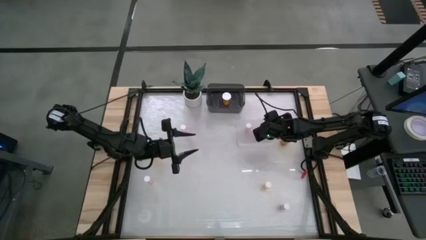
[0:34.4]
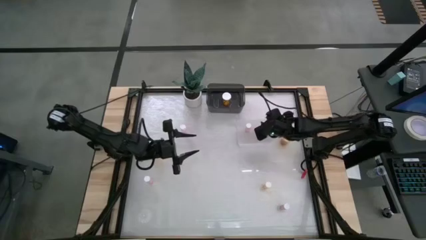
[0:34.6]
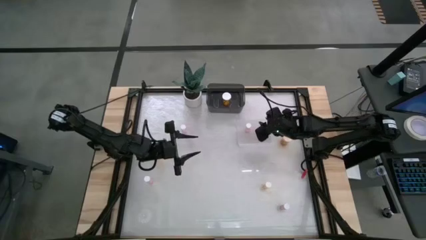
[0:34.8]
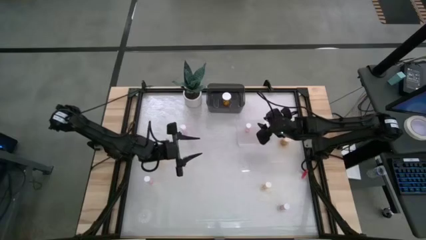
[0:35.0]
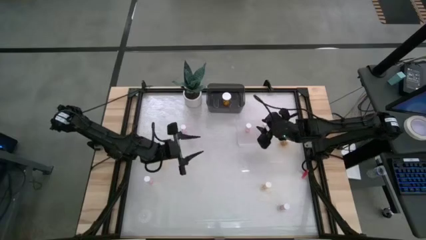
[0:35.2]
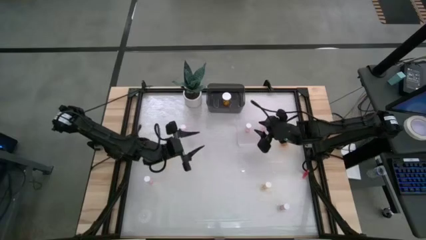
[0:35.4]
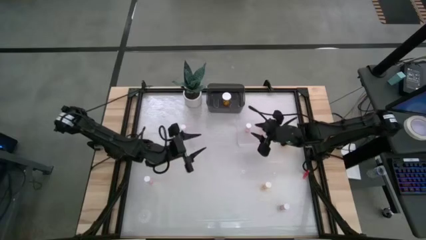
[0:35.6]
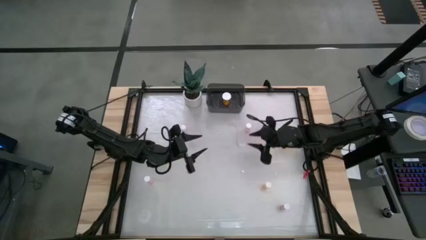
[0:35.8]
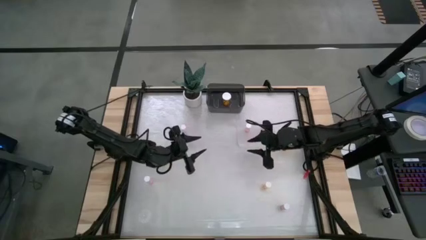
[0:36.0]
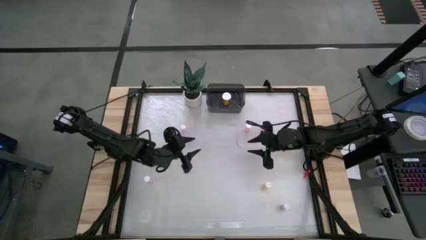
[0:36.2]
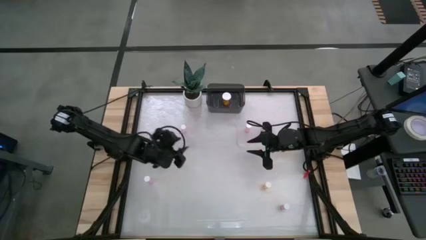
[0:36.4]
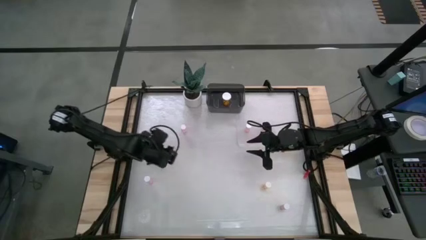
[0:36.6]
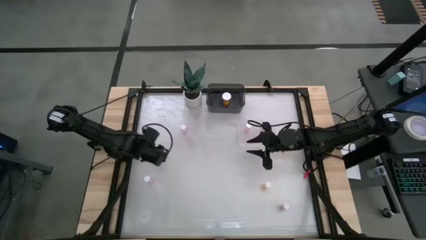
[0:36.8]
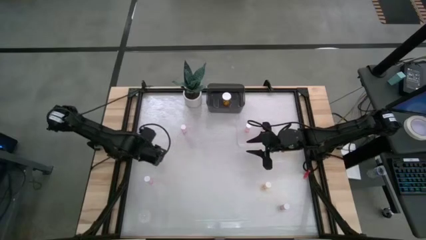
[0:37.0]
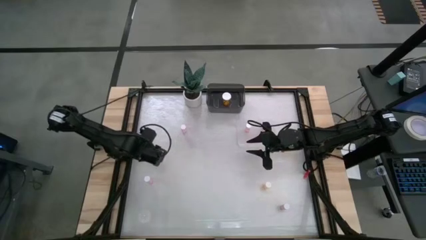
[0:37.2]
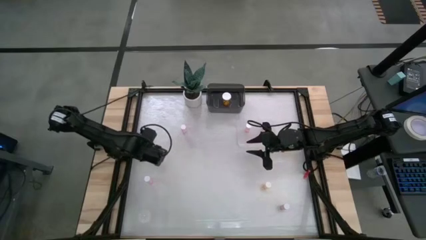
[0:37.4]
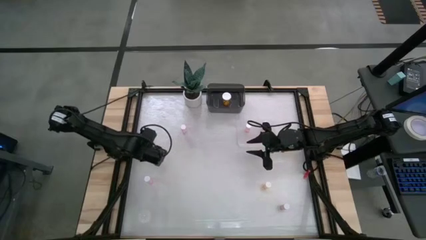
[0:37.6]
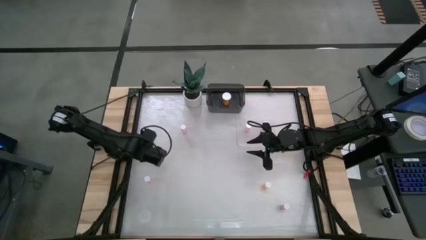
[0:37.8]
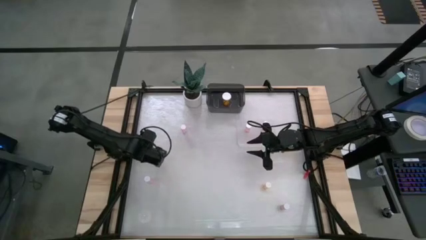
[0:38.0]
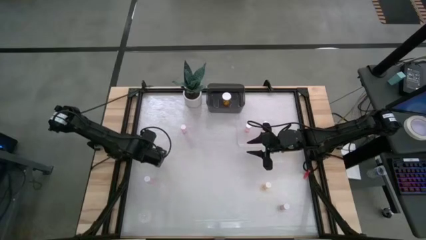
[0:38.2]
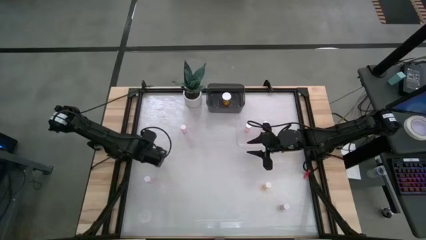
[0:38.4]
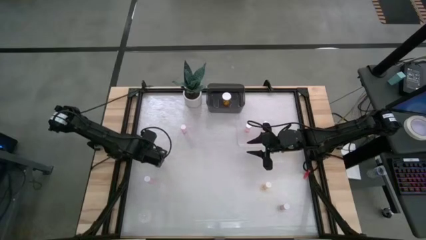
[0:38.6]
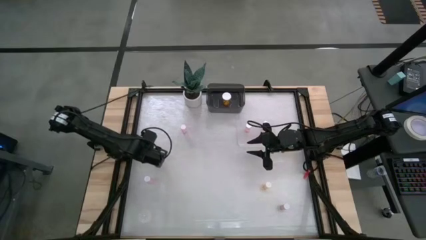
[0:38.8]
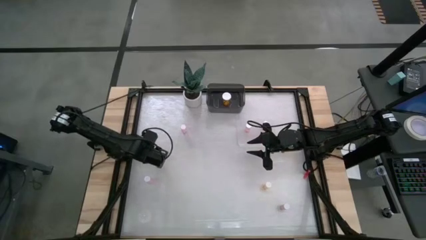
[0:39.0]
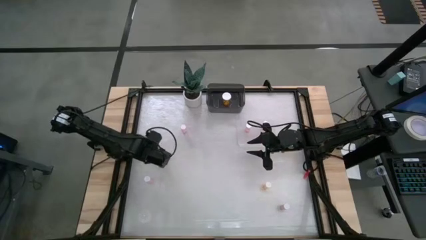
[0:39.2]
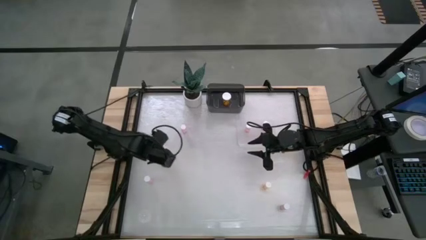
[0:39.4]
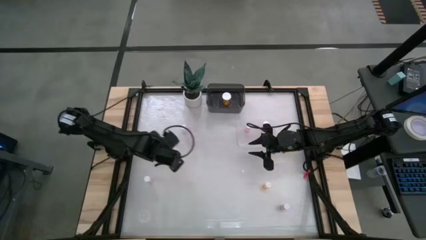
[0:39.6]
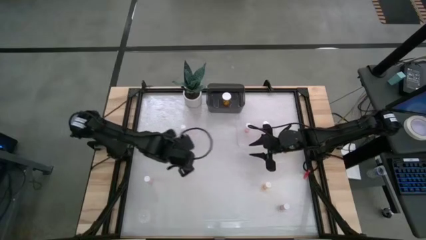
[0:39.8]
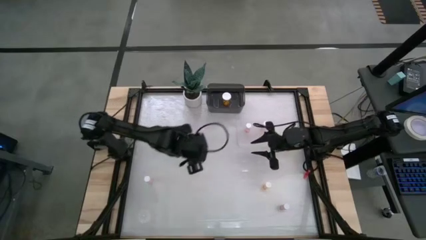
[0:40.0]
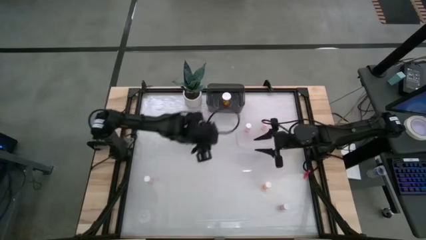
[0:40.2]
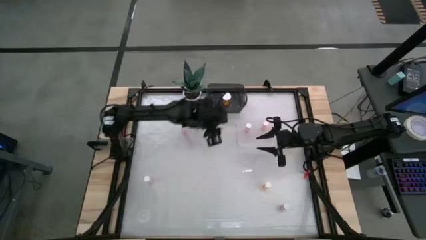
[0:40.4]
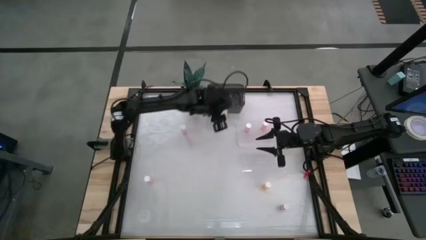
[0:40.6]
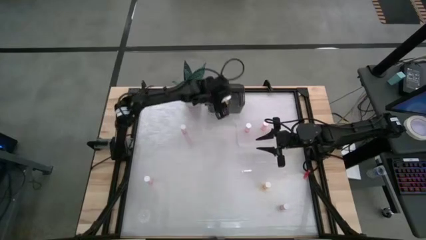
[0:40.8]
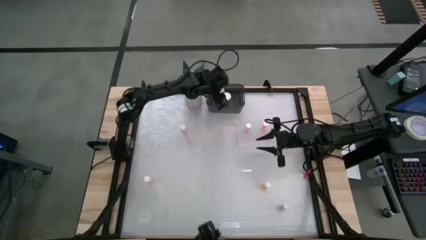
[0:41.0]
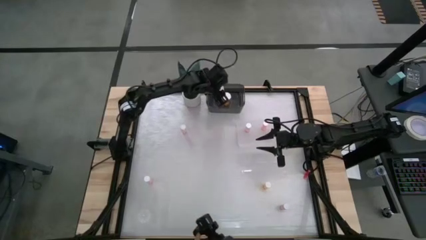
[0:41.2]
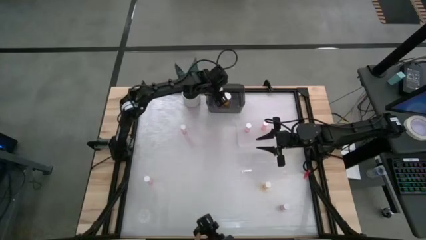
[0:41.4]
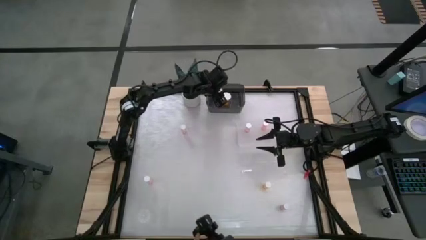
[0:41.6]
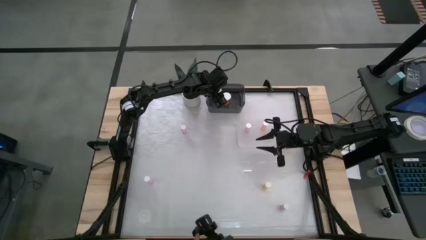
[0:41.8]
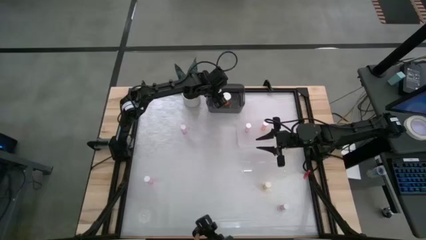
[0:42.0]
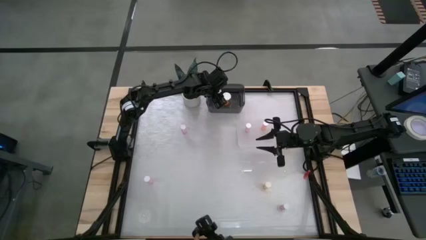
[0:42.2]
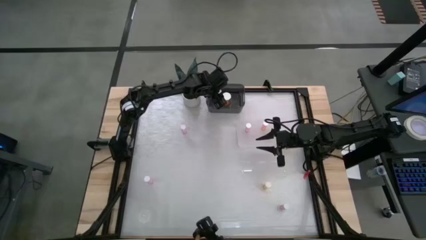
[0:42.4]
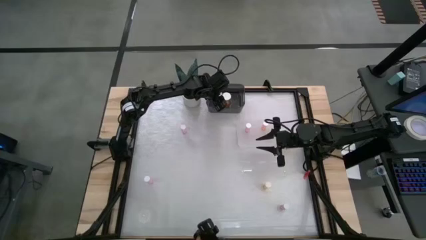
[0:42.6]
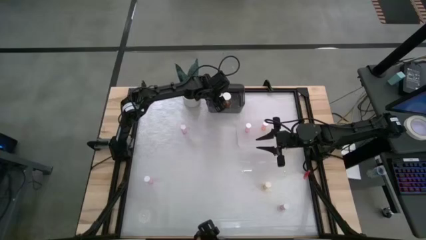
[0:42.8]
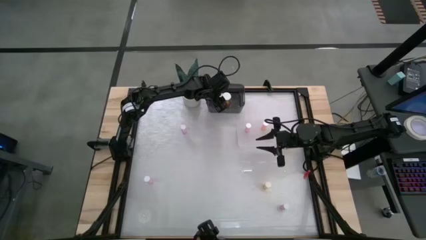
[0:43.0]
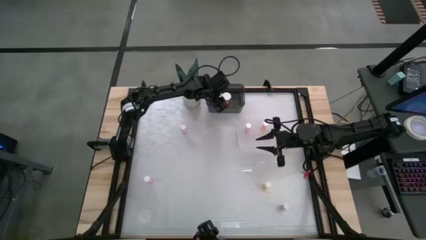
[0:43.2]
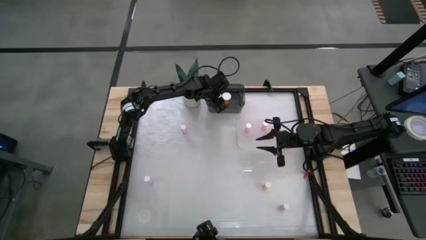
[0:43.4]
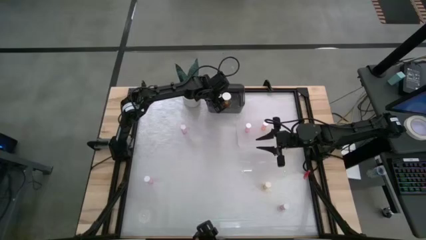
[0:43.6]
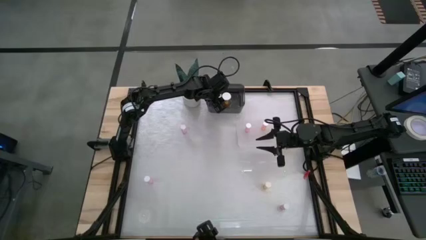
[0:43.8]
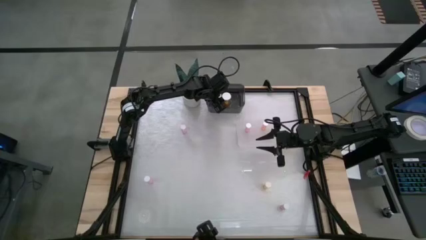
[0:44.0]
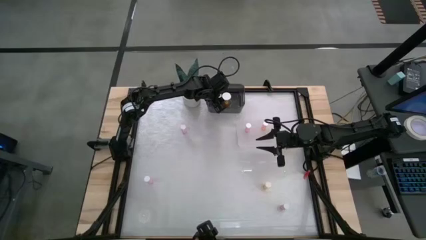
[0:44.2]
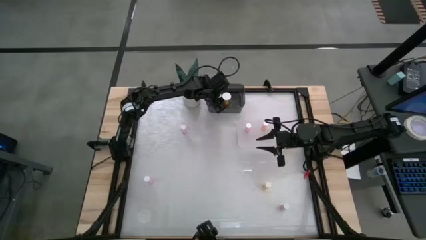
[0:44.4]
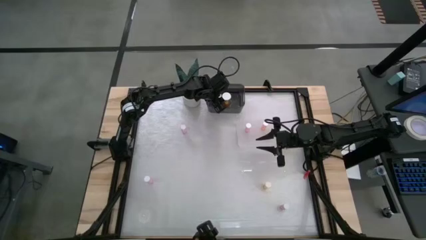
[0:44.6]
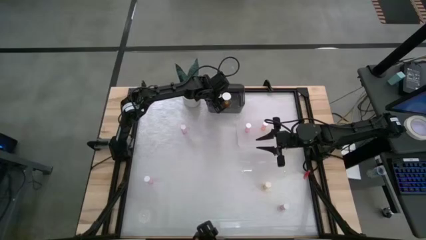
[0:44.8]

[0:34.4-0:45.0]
Task: Pick and place medicine bottles into bin by pill shape (circle, oval)
Put the large orange pill bottle into the black bin

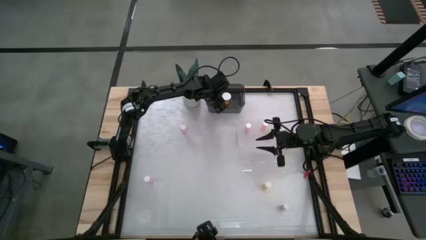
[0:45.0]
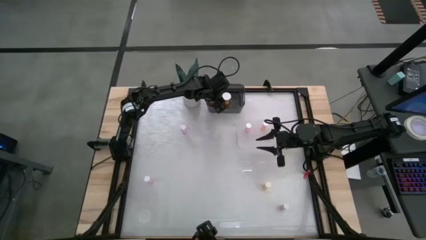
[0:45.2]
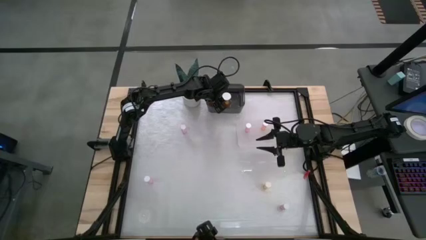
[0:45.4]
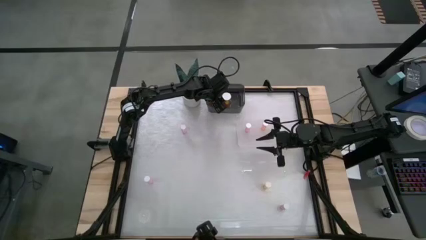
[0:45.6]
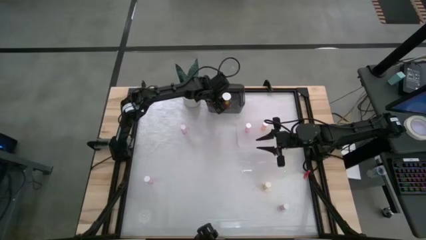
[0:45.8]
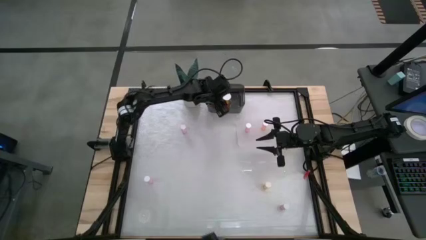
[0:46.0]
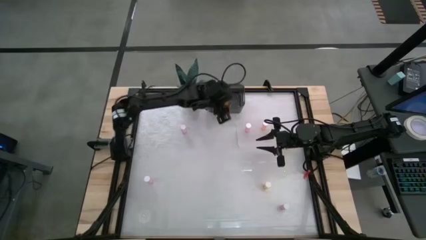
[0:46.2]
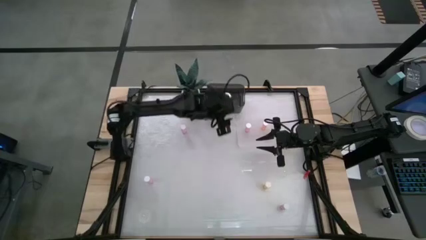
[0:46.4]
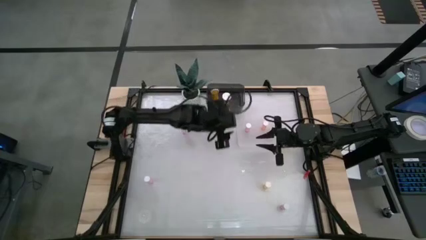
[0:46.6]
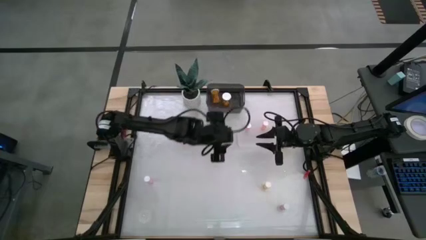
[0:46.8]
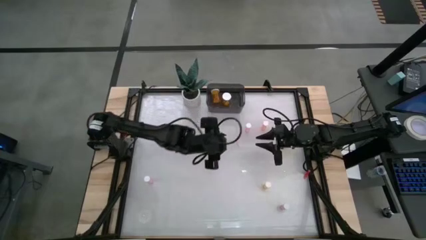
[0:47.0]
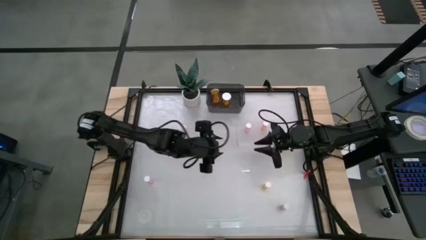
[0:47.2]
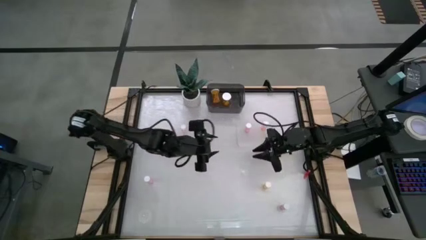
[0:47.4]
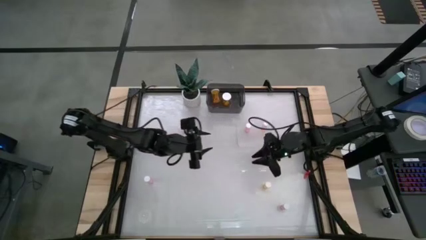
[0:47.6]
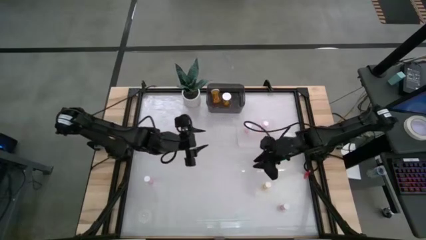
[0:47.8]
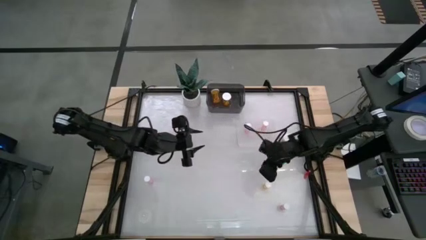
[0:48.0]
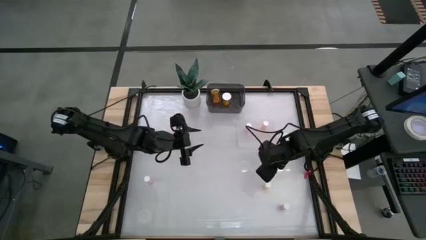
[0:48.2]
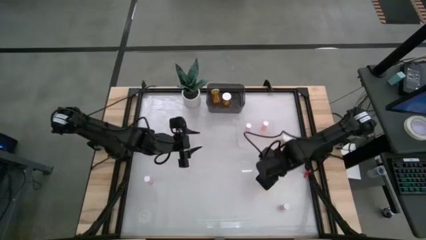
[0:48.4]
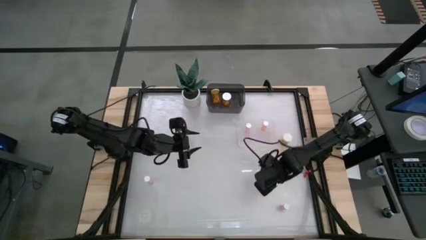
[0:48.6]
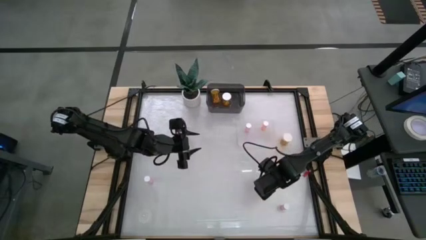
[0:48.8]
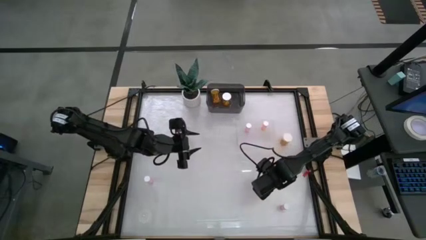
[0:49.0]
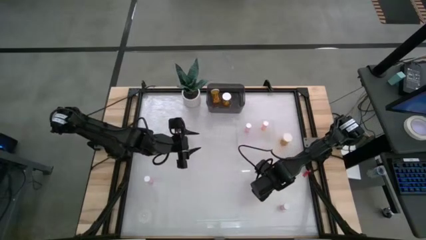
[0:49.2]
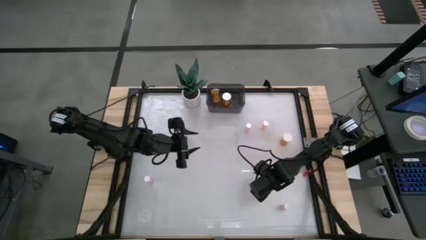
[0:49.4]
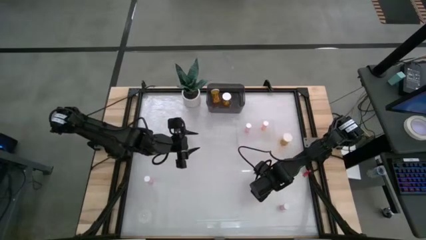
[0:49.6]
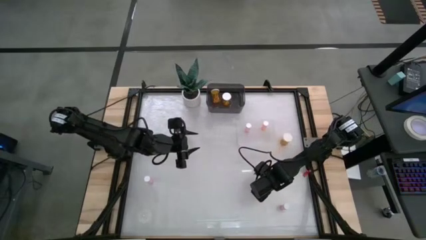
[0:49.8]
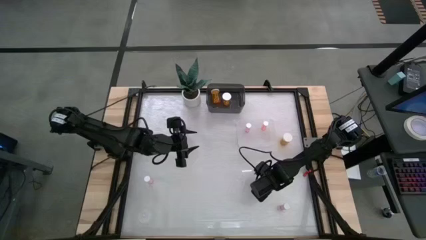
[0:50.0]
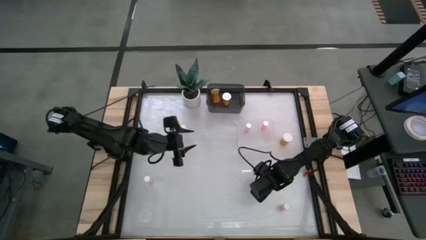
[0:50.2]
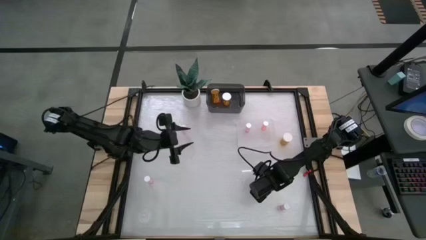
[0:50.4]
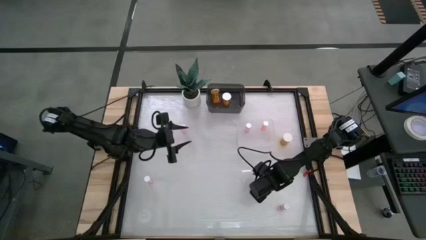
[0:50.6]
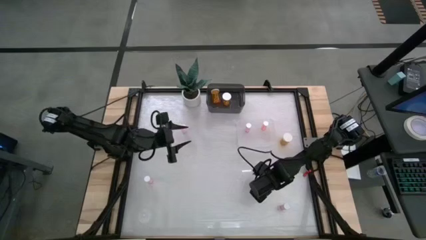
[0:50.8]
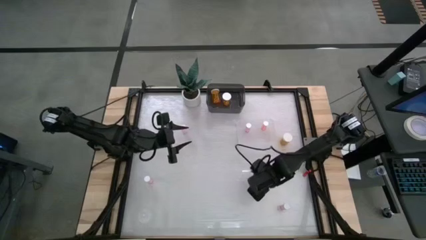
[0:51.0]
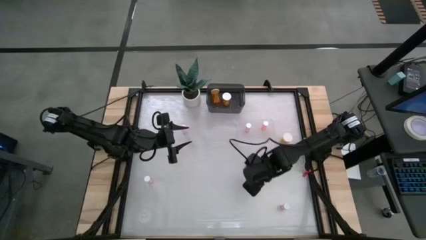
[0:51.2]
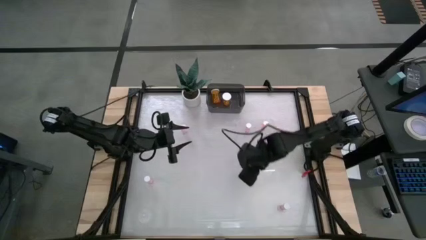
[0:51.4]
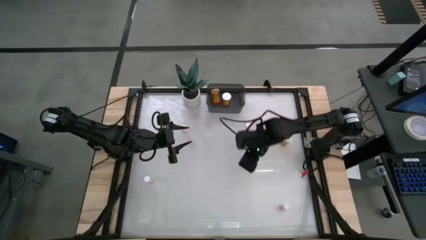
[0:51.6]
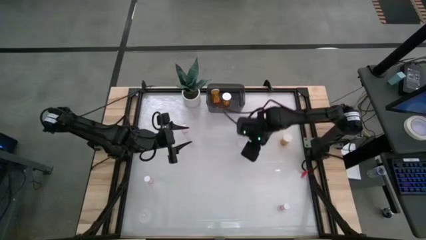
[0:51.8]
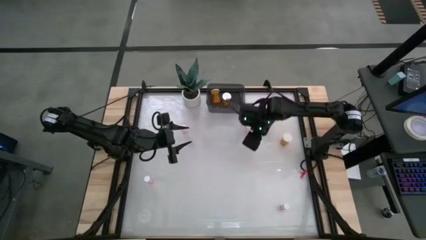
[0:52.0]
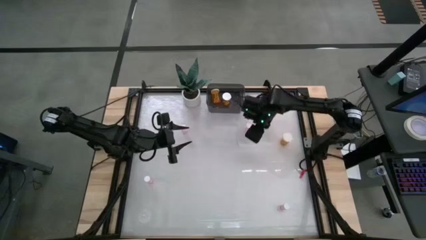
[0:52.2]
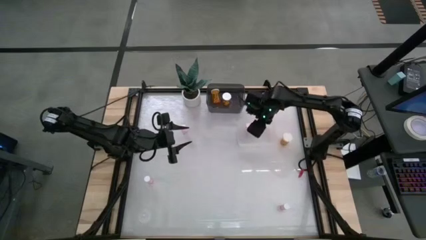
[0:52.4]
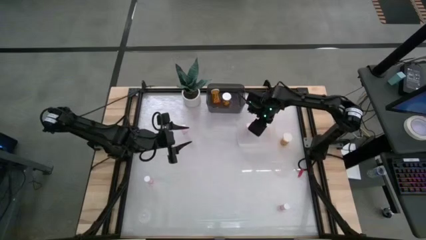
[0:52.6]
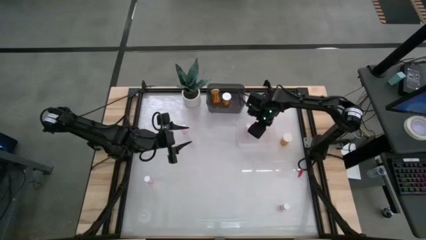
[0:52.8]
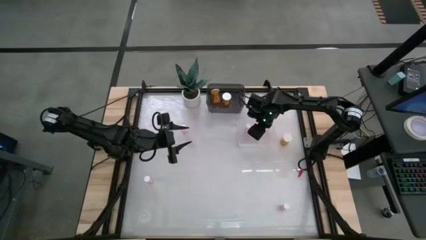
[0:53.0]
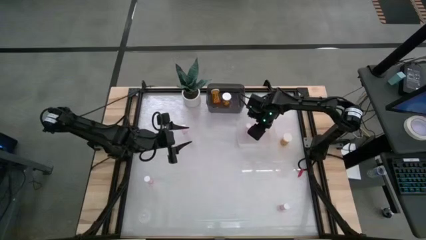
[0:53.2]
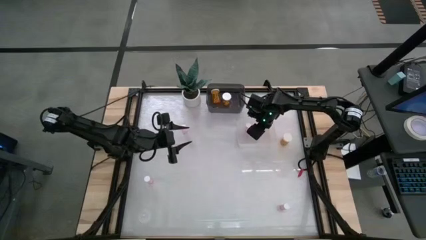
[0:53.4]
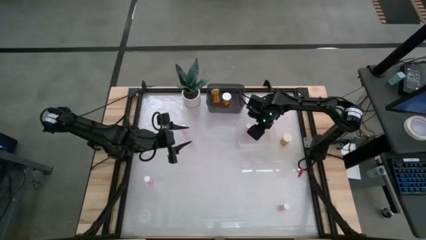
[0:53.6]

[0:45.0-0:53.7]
Put the small orange pill bottle into the white bin
